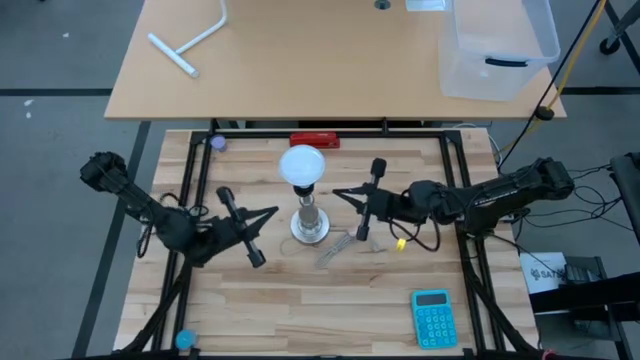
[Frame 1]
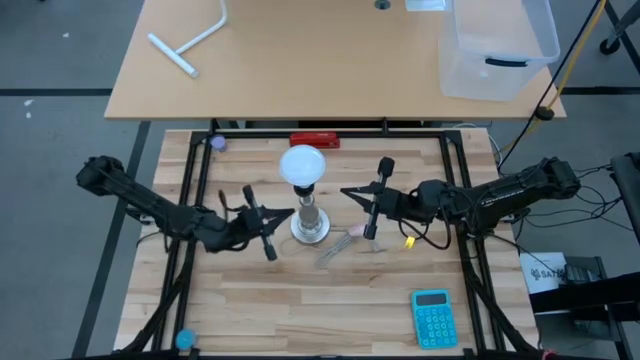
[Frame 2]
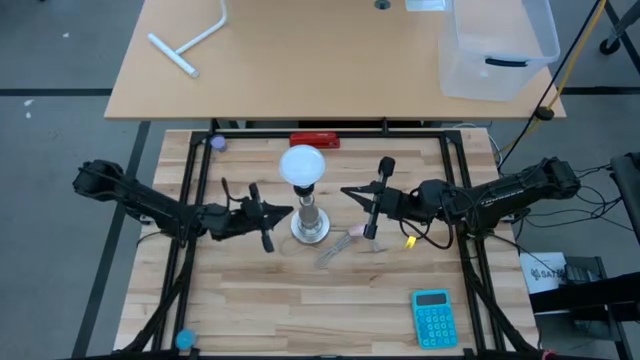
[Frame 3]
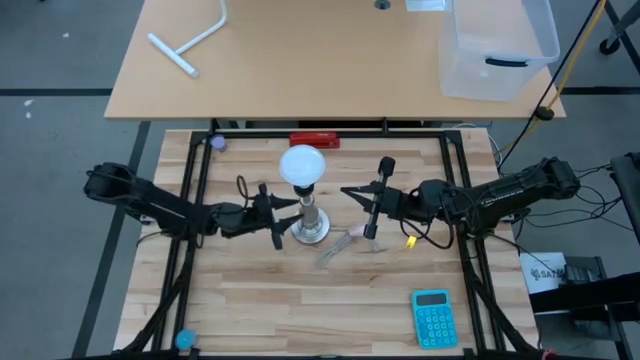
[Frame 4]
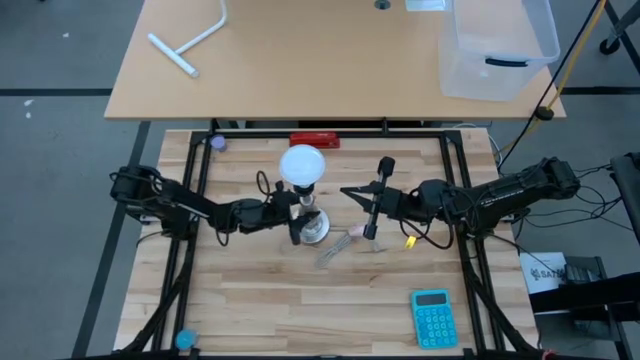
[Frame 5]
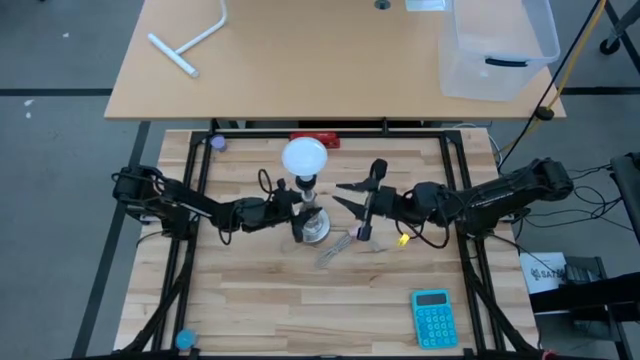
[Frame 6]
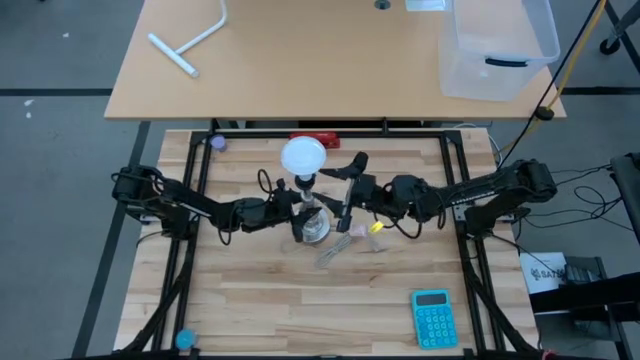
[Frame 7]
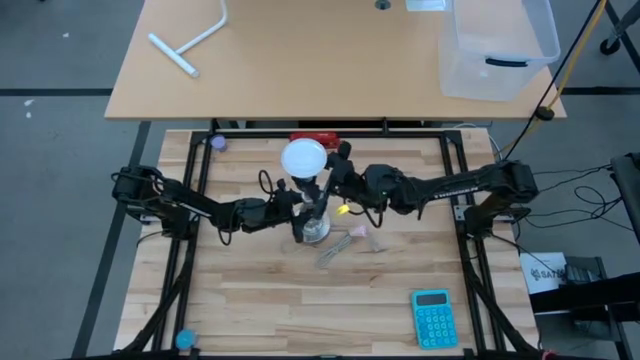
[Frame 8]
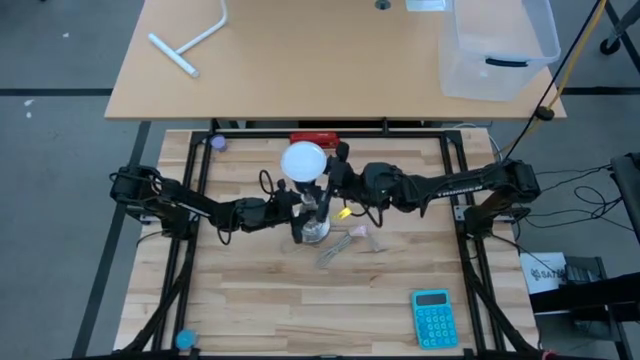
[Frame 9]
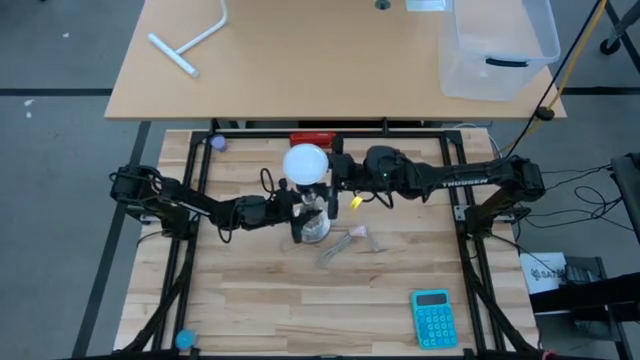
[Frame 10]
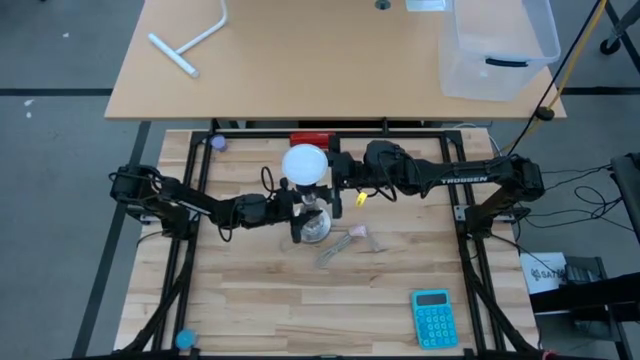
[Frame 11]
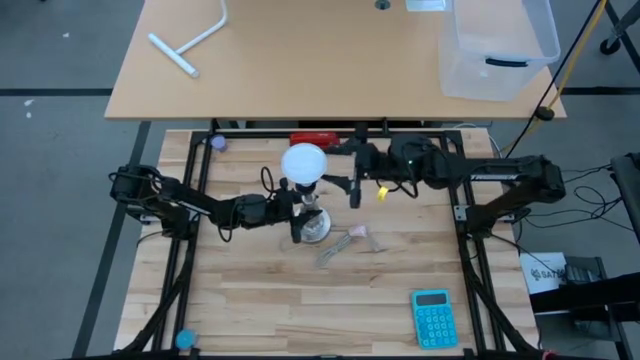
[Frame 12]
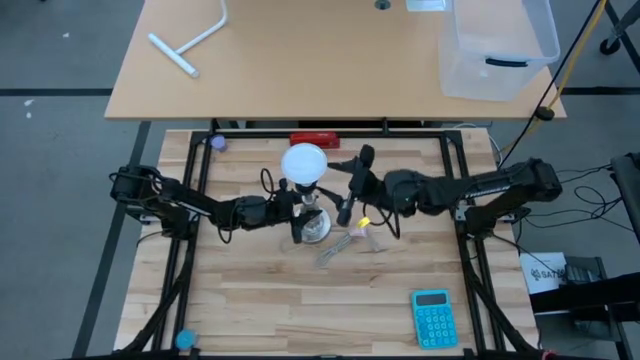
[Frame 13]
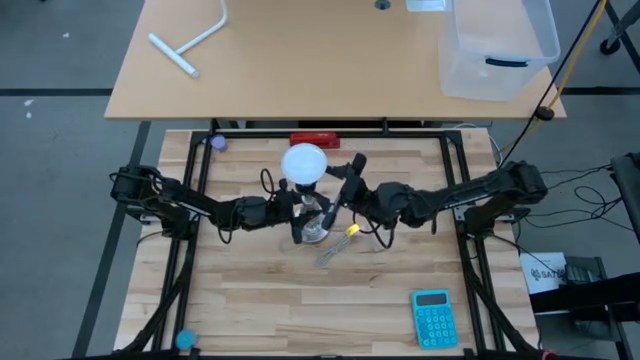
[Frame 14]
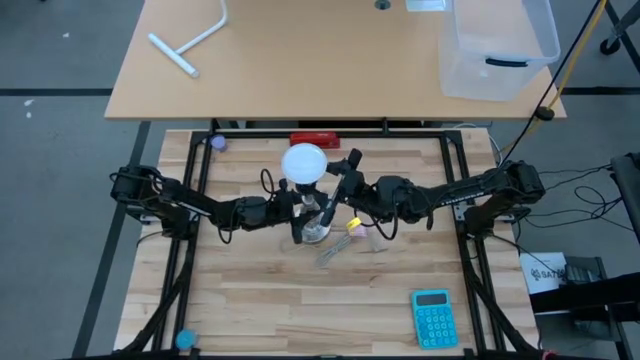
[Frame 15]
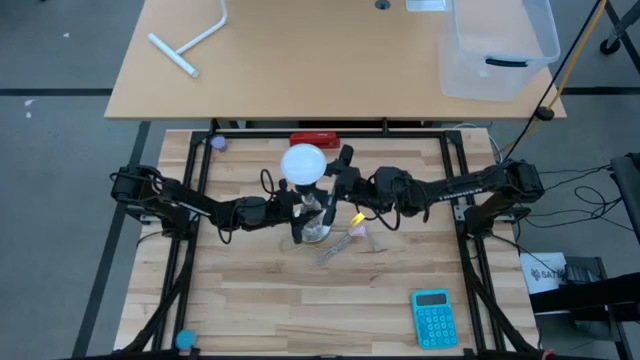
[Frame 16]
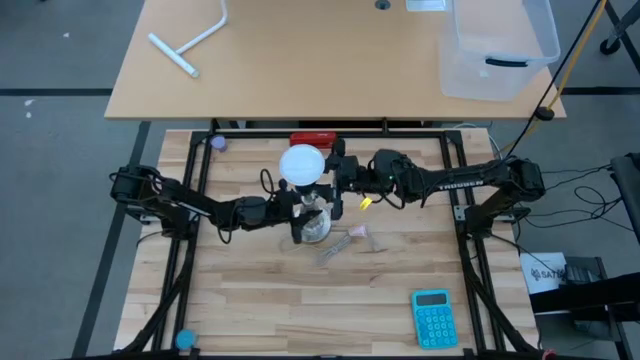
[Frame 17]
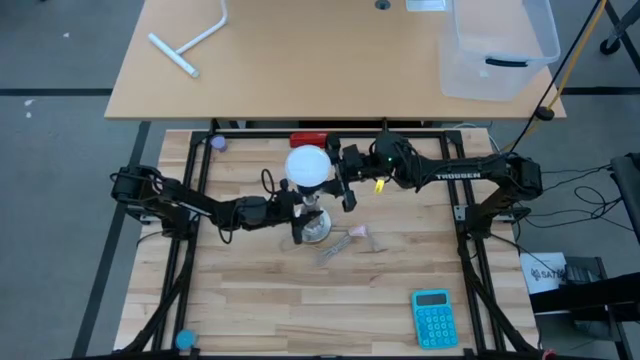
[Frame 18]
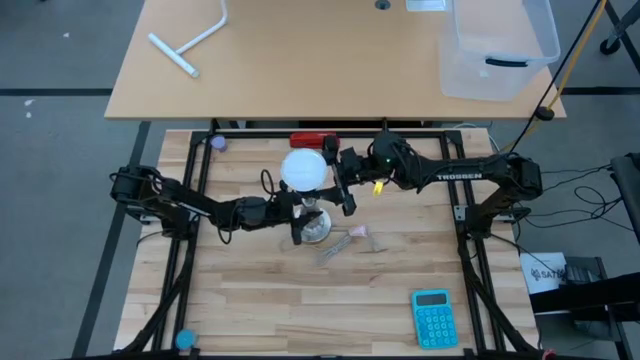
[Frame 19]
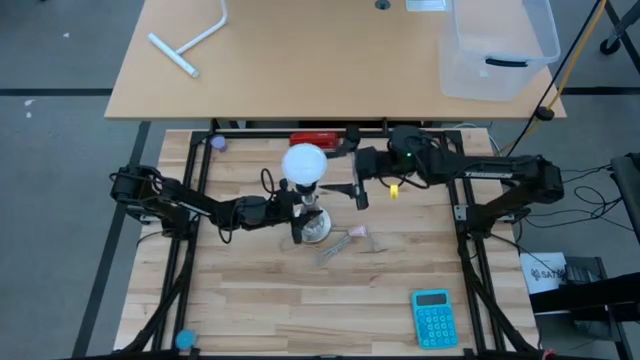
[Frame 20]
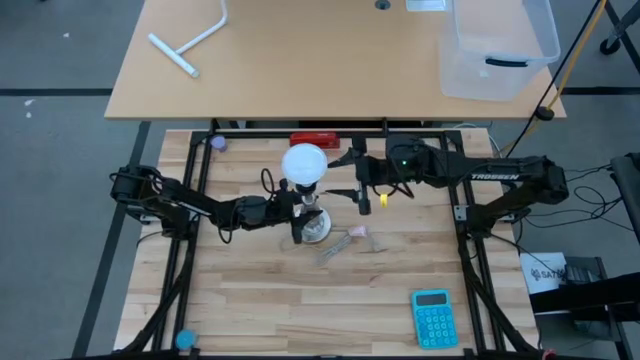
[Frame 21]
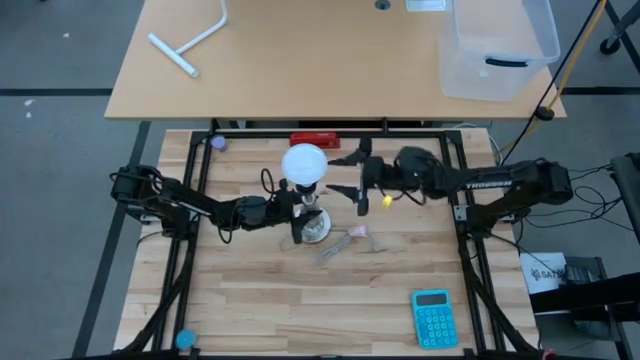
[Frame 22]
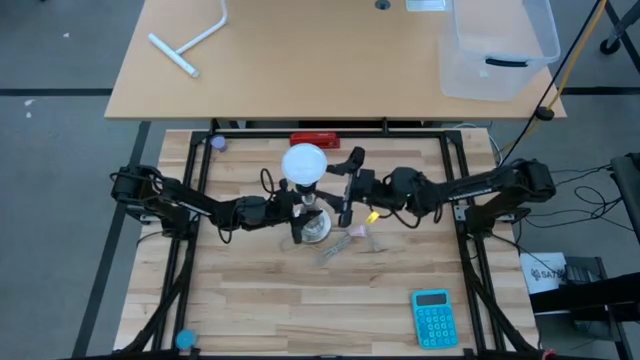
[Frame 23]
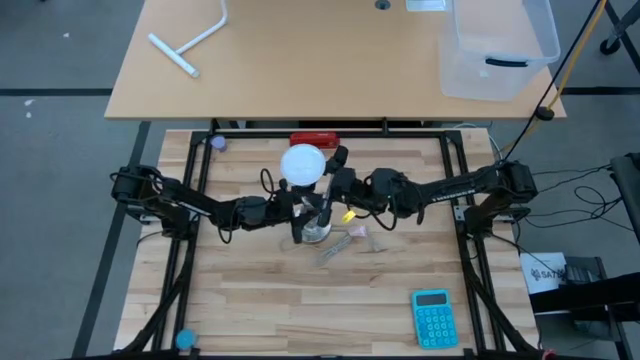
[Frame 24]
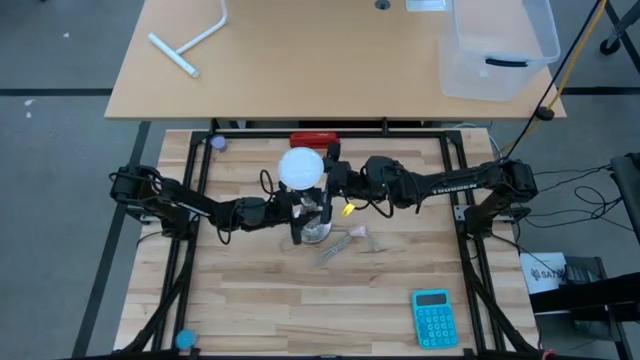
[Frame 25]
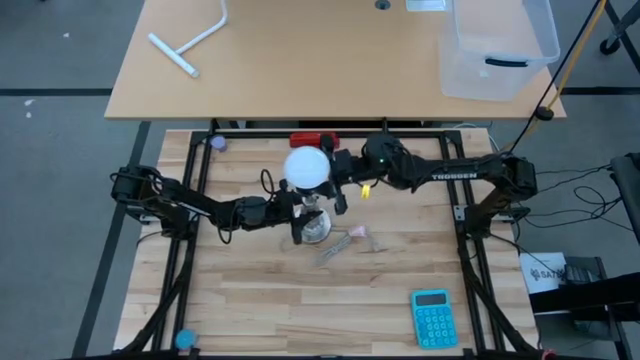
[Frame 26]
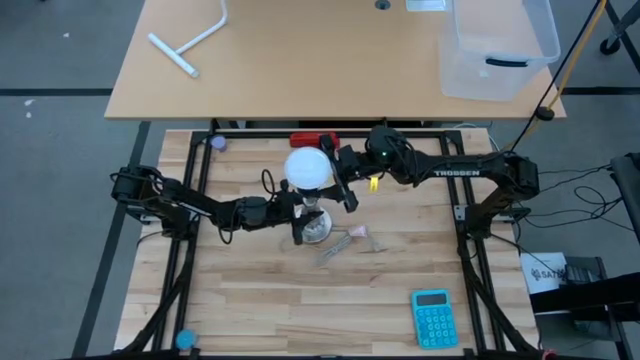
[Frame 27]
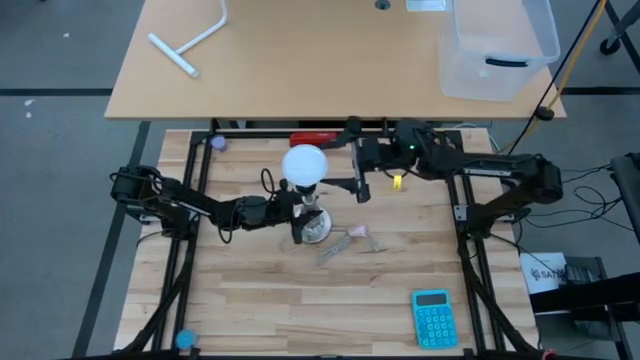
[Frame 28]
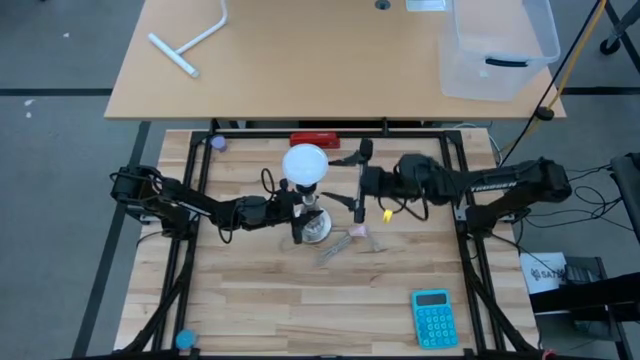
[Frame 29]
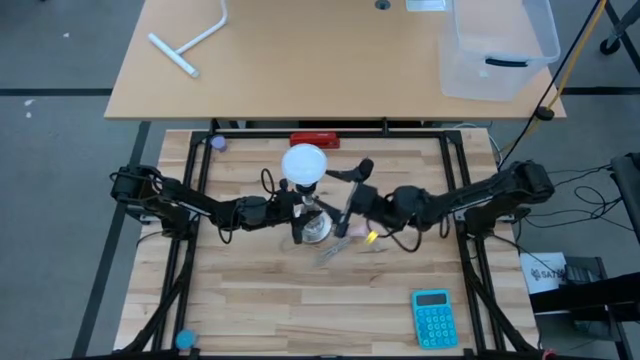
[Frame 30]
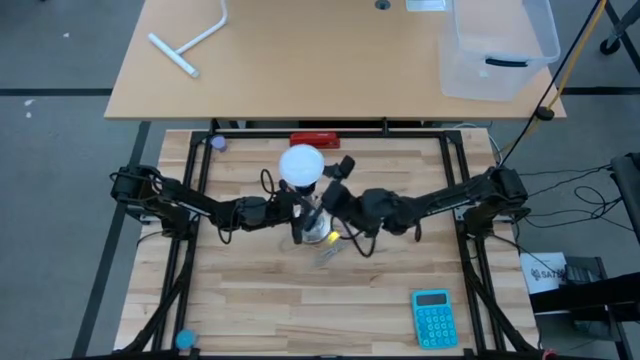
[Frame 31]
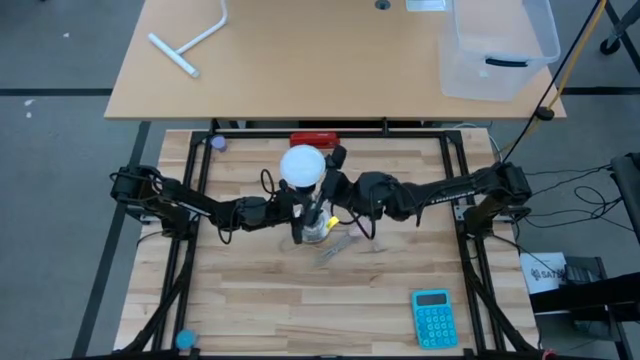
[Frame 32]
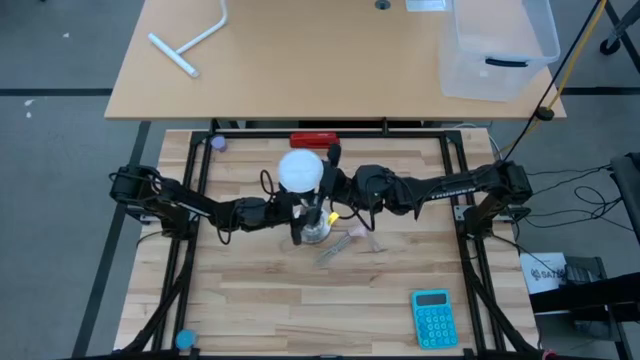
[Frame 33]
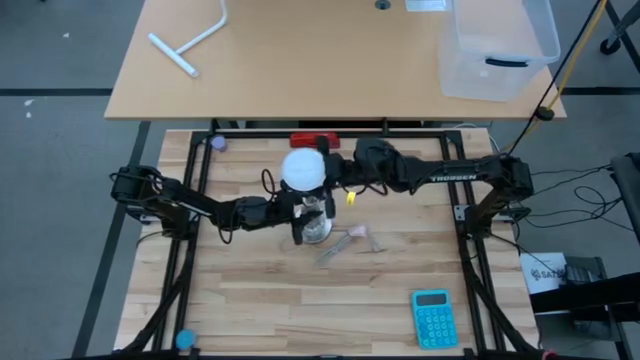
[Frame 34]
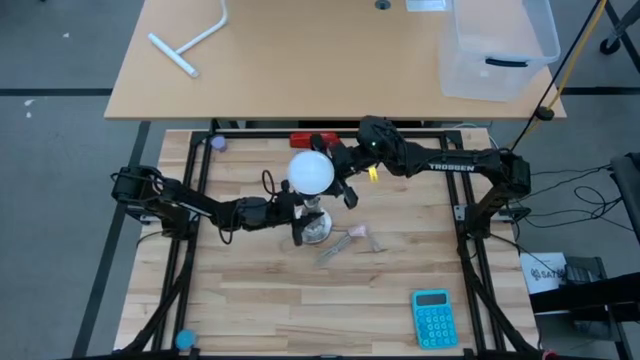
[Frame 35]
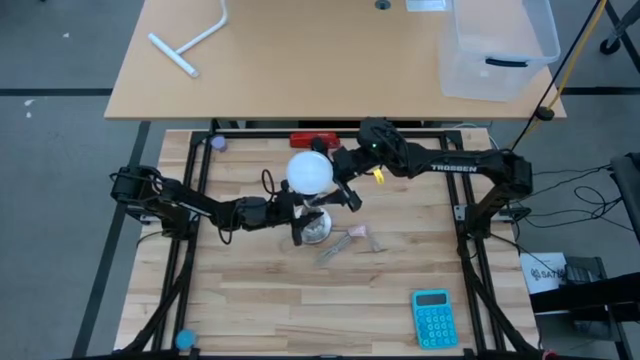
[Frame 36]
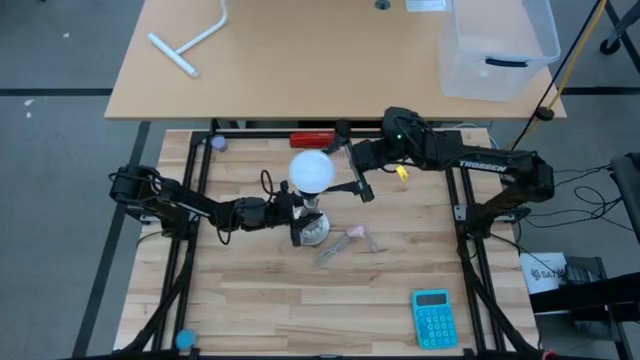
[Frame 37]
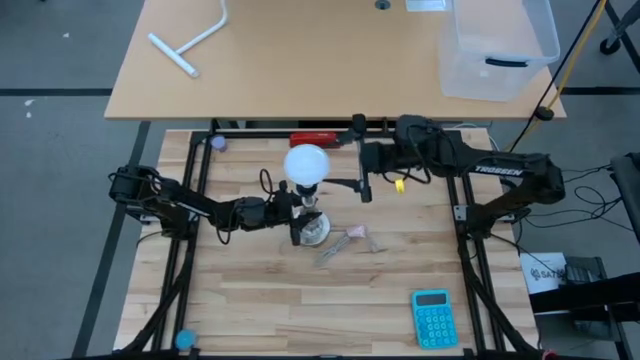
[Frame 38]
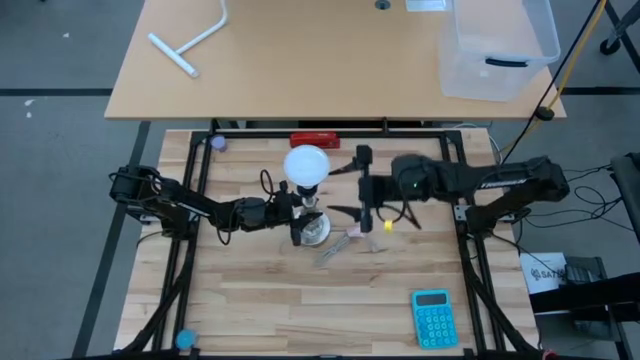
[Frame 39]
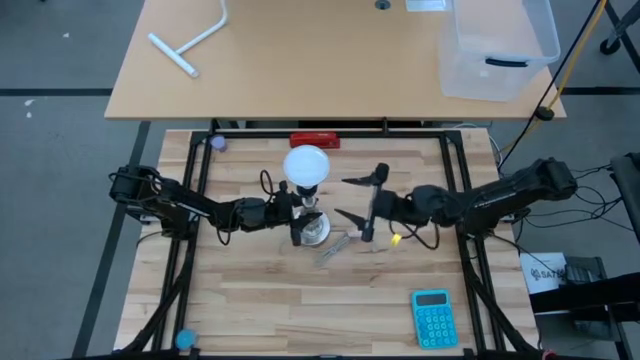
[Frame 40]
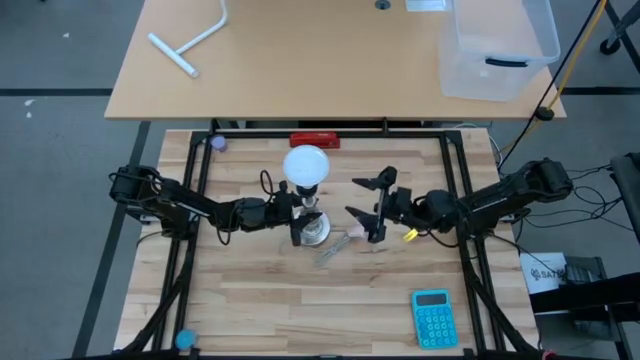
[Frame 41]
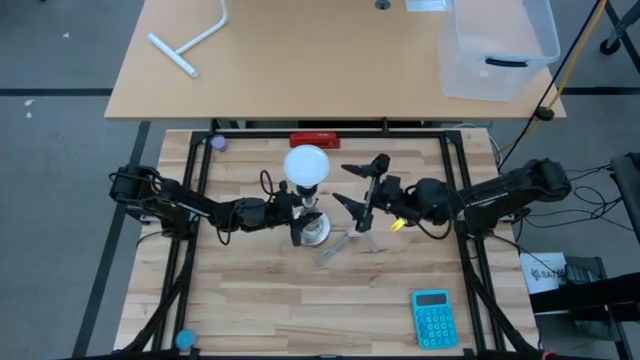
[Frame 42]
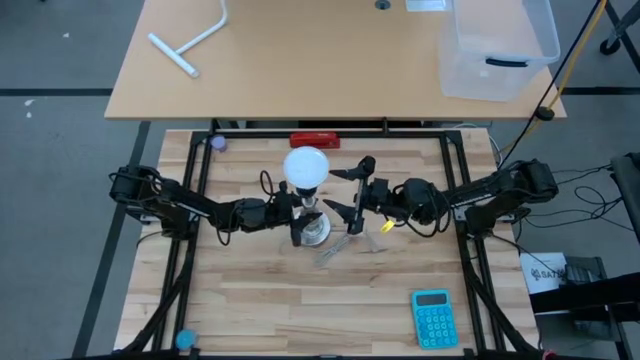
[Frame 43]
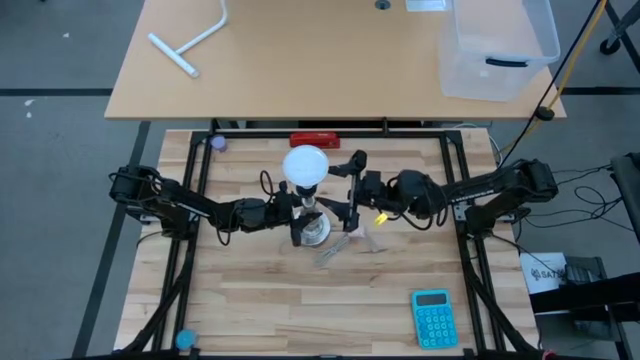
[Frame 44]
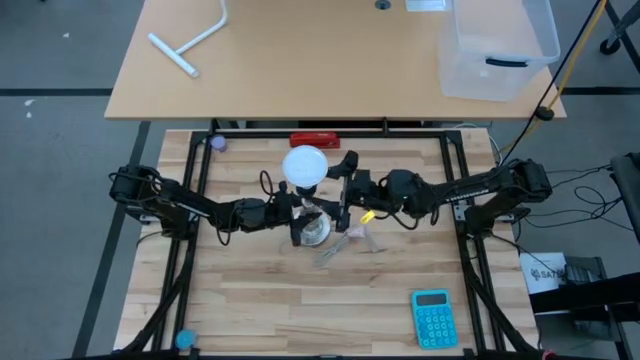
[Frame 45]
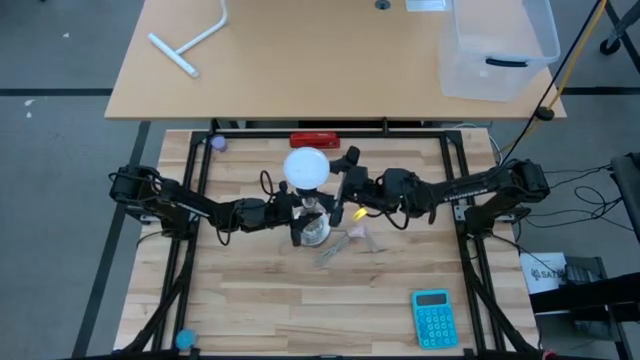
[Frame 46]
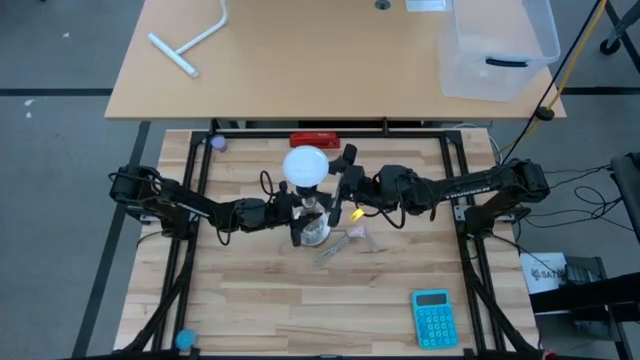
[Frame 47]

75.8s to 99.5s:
Task: Screw lightbulb
Remove the white lightbulb from the silver lamp
